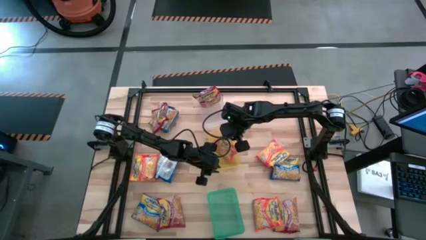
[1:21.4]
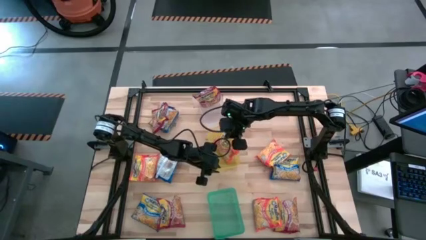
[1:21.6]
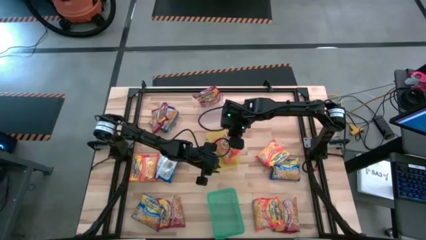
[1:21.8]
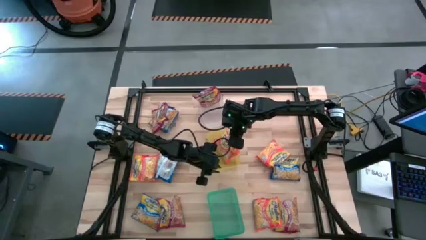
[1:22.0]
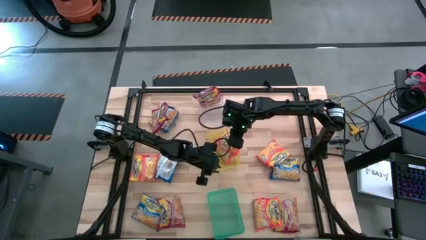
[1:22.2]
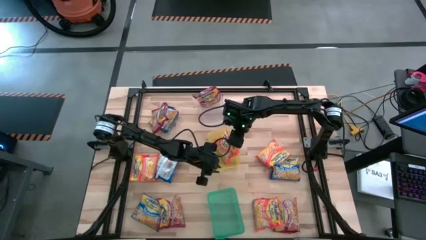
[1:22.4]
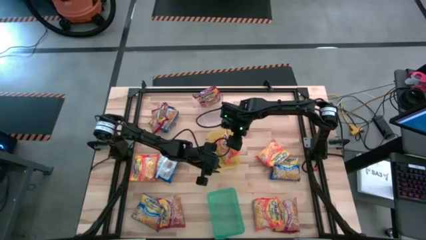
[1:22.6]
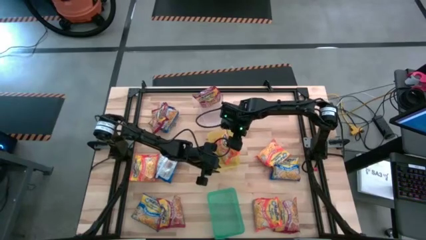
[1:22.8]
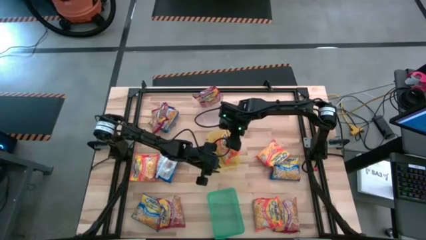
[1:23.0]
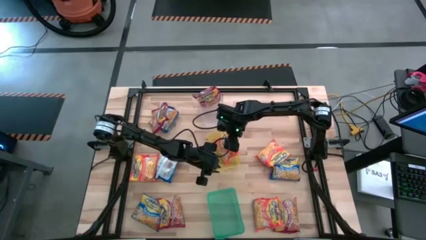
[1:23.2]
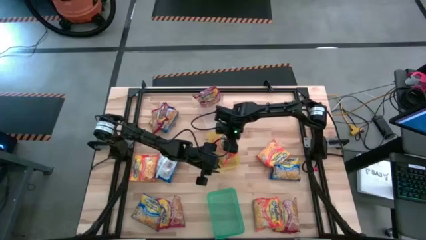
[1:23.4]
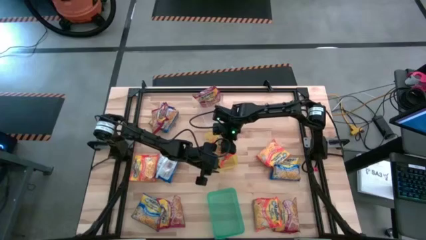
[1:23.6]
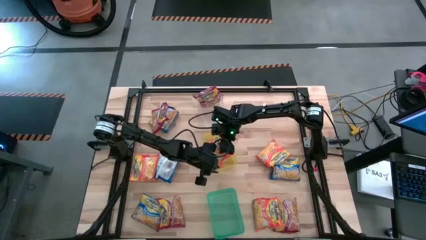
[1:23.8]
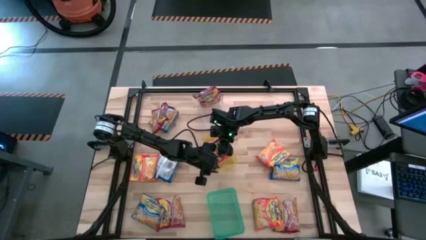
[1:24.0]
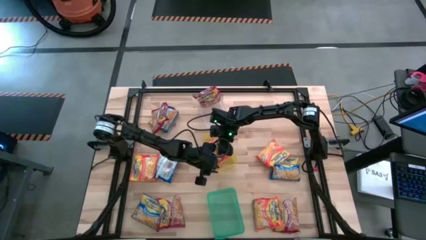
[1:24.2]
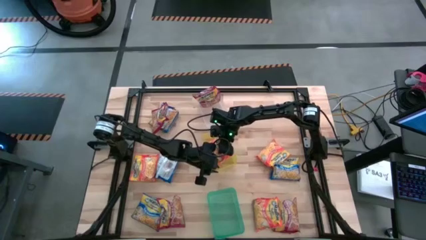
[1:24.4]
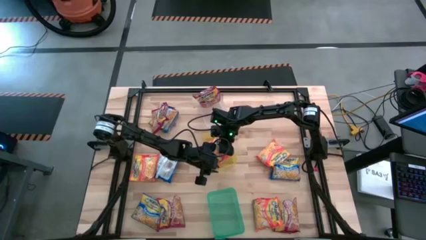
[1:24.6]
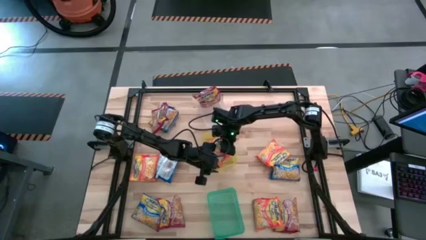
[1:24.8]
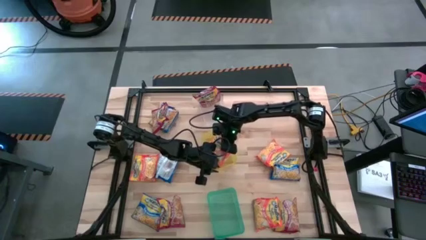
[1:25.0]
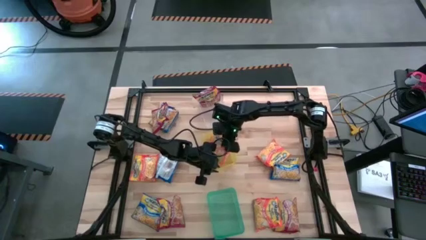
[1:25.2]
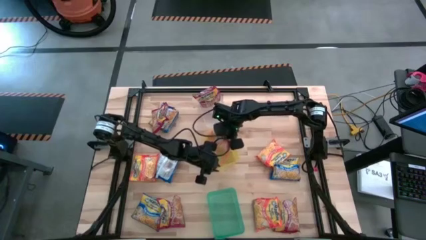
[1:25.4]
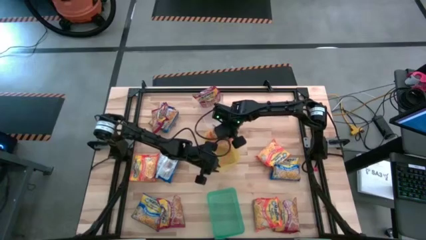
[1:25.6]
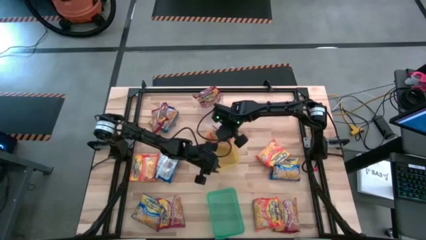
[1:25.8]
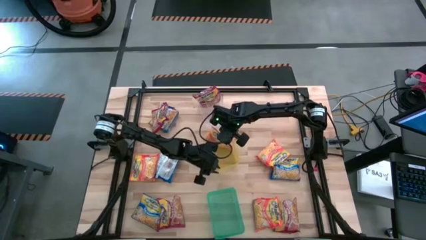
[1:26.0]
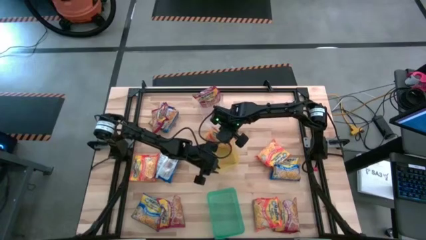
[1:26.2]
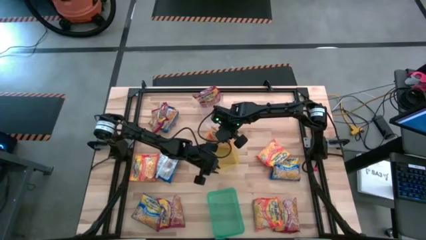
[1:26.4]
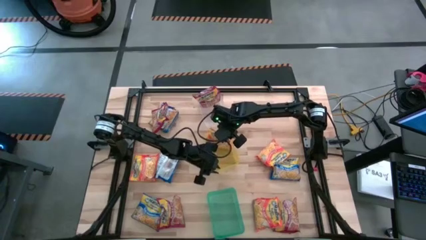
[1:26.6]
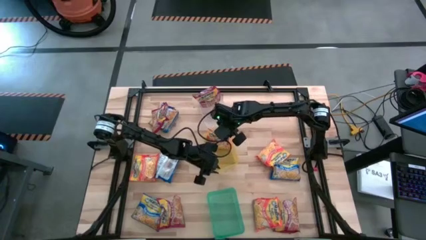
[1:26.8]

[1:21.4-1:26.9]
Task: Sort Maruchan noodles
Adjust the orange noodle pack in the yellow bin

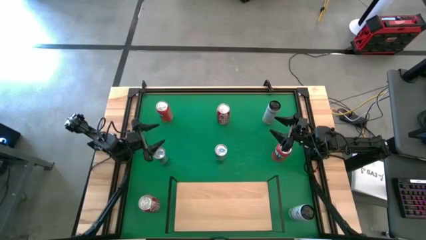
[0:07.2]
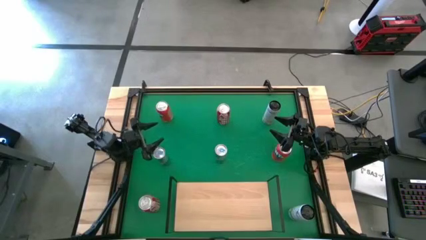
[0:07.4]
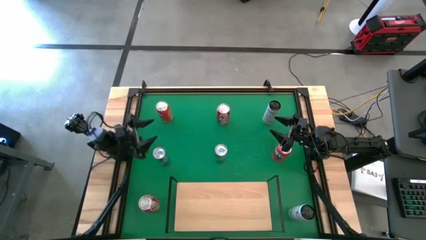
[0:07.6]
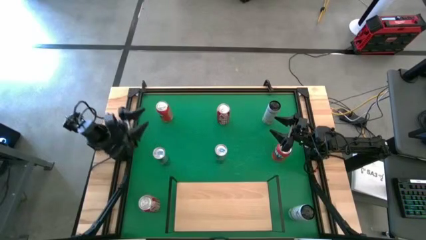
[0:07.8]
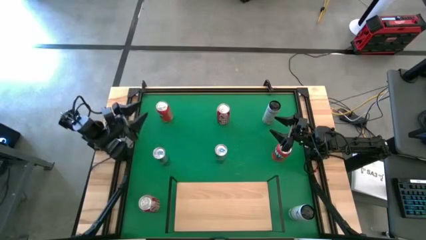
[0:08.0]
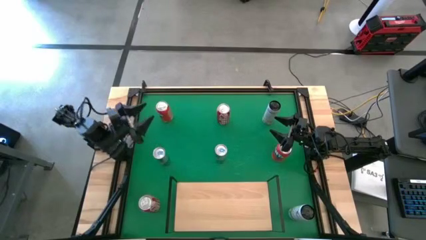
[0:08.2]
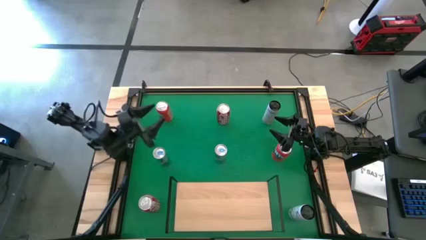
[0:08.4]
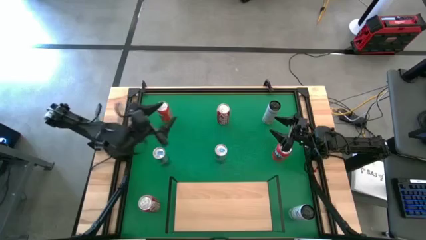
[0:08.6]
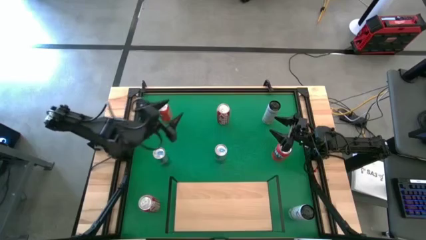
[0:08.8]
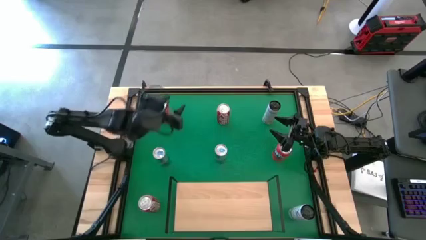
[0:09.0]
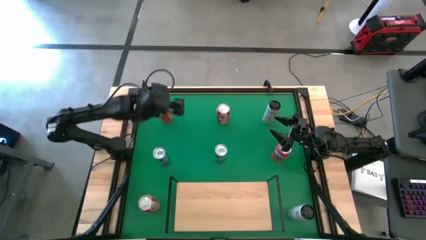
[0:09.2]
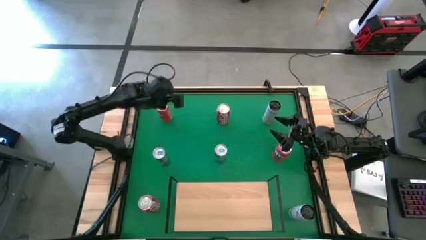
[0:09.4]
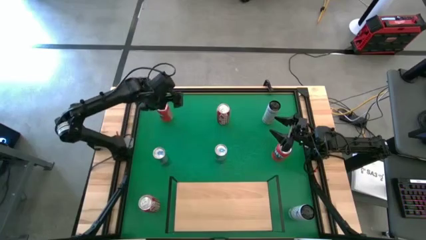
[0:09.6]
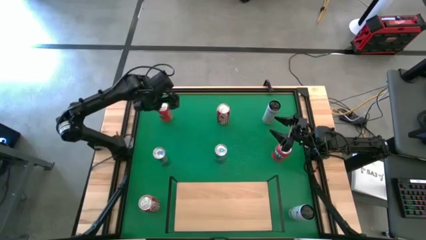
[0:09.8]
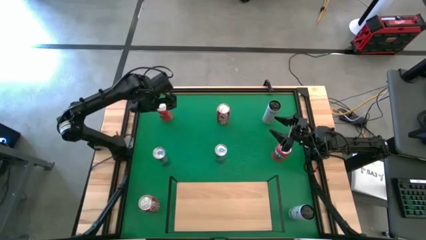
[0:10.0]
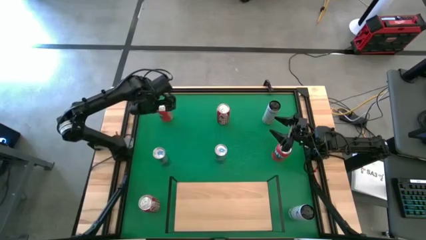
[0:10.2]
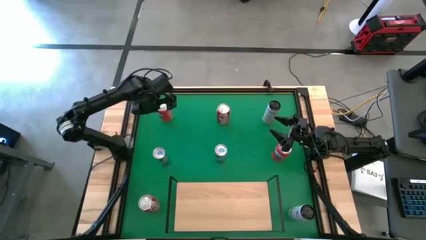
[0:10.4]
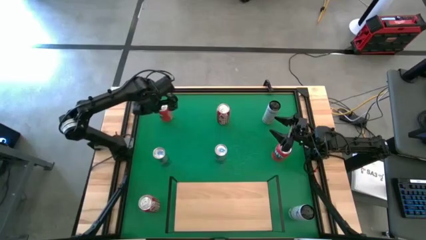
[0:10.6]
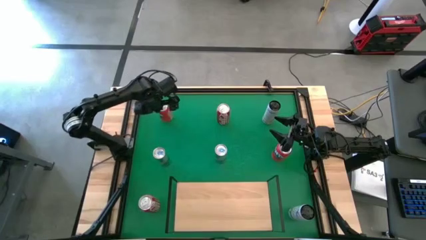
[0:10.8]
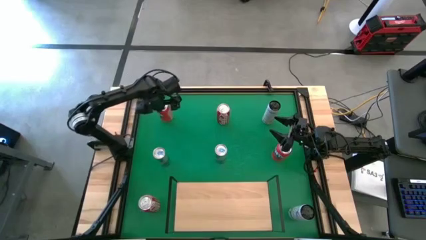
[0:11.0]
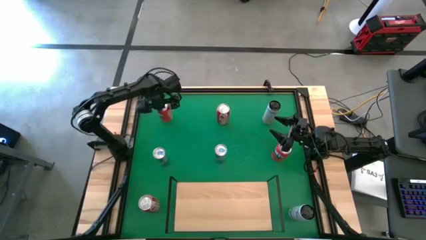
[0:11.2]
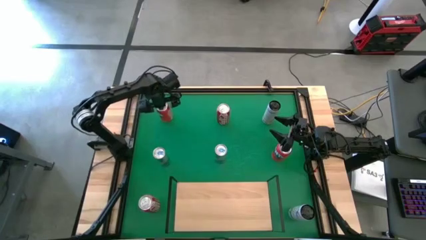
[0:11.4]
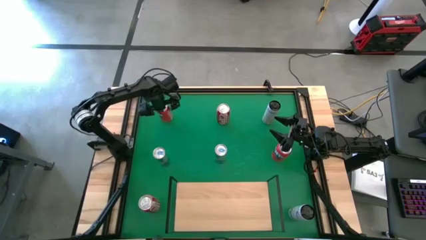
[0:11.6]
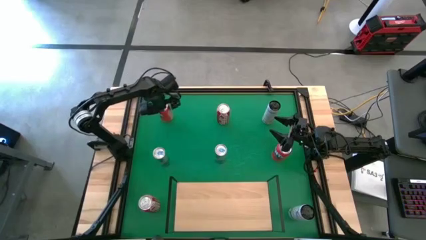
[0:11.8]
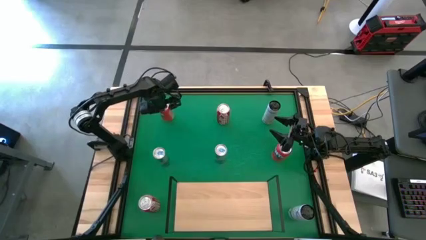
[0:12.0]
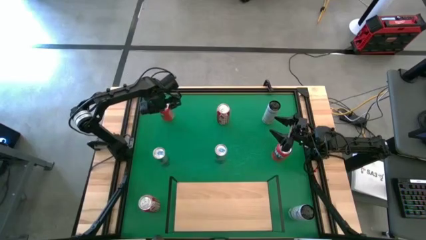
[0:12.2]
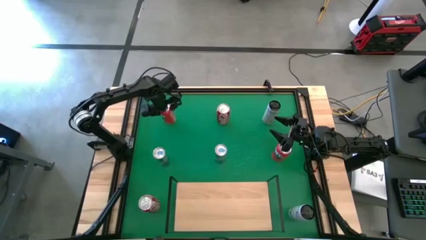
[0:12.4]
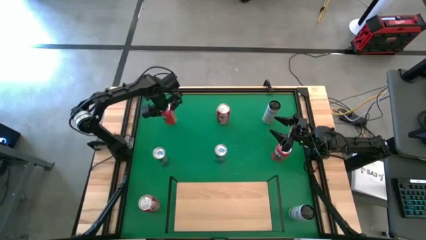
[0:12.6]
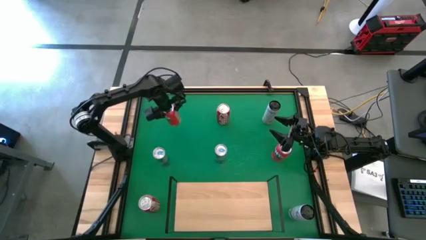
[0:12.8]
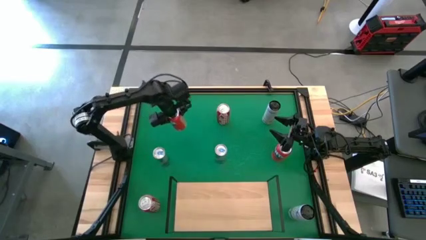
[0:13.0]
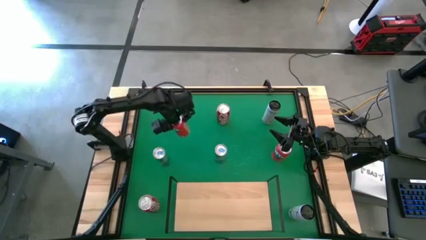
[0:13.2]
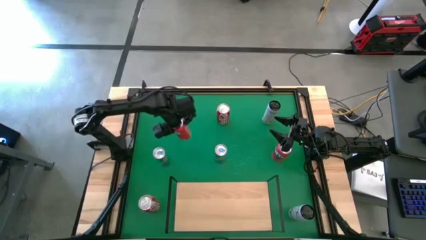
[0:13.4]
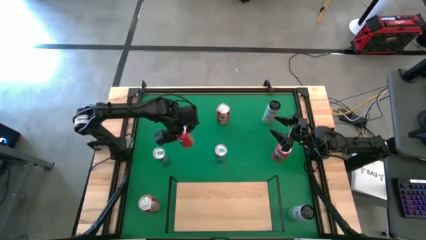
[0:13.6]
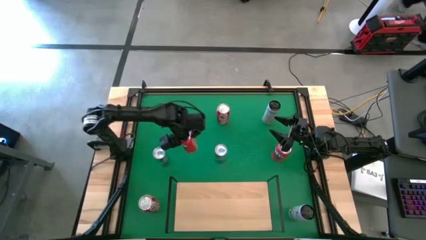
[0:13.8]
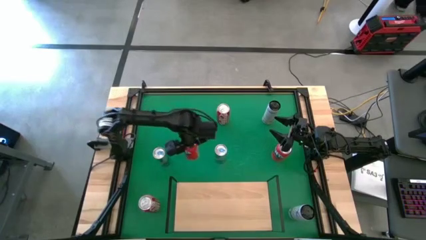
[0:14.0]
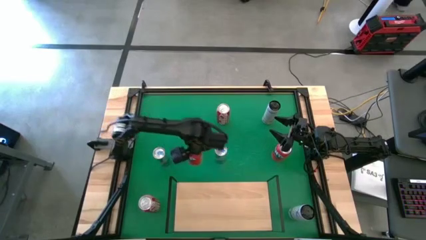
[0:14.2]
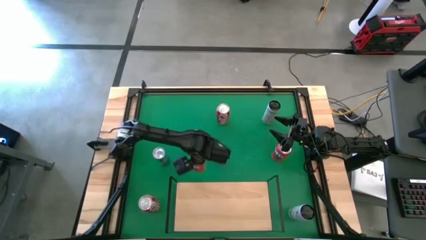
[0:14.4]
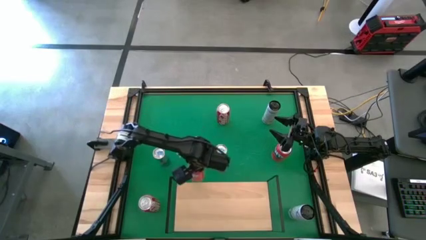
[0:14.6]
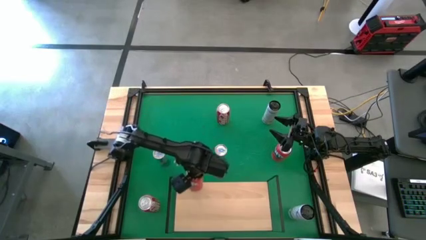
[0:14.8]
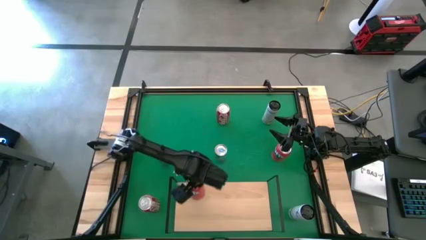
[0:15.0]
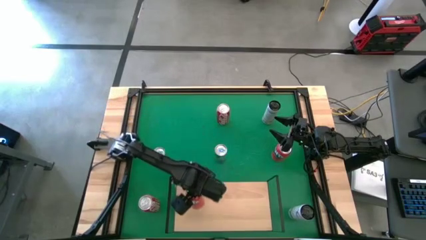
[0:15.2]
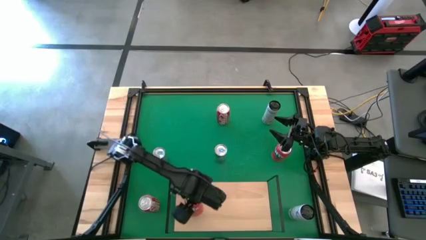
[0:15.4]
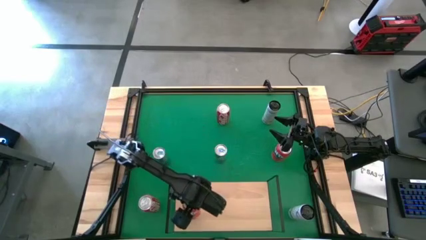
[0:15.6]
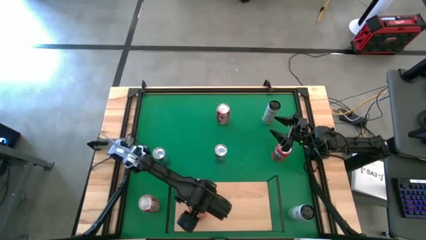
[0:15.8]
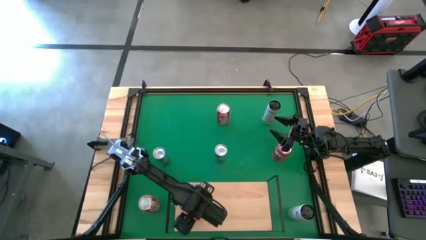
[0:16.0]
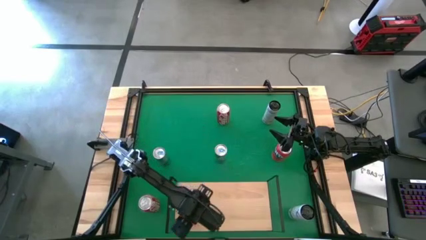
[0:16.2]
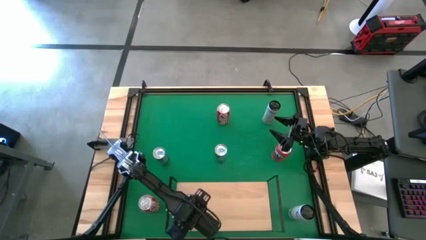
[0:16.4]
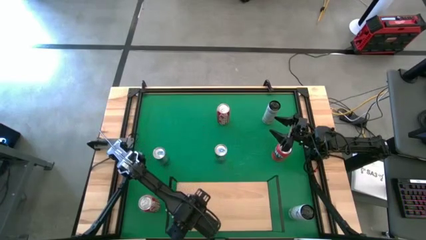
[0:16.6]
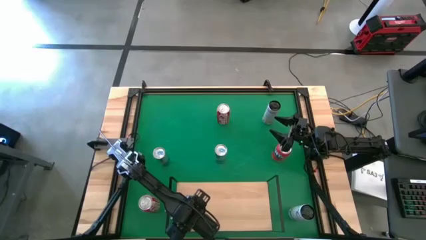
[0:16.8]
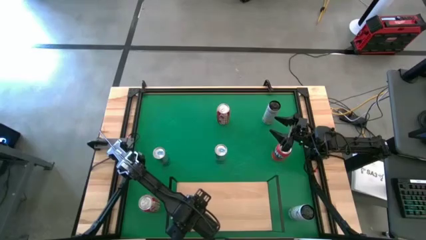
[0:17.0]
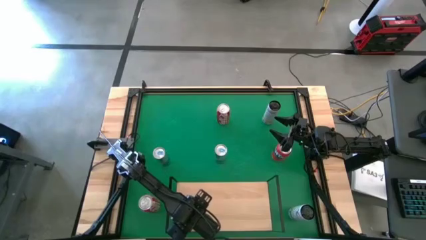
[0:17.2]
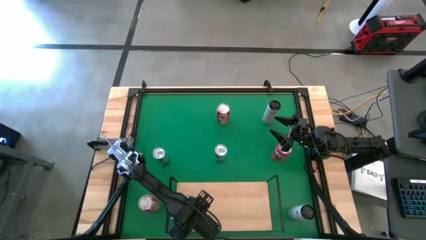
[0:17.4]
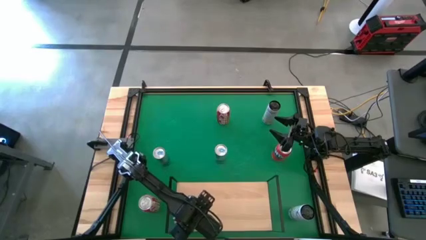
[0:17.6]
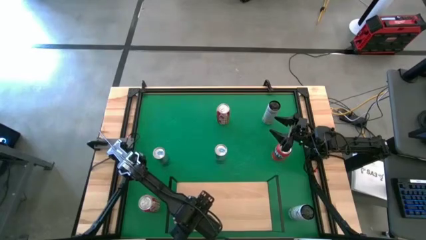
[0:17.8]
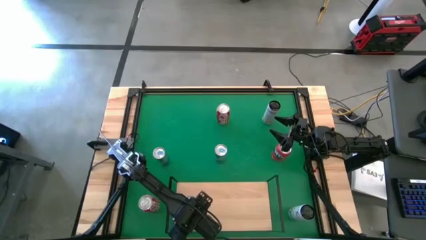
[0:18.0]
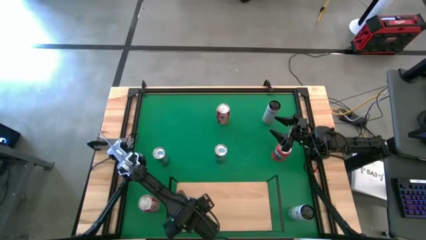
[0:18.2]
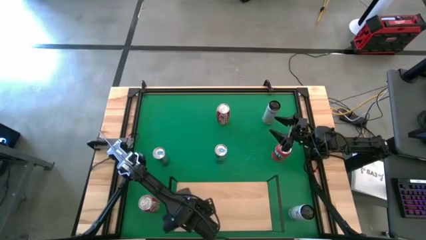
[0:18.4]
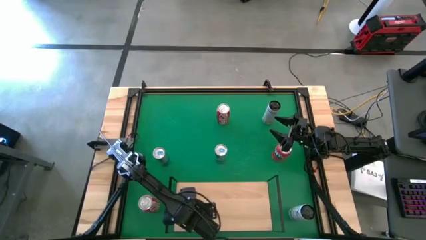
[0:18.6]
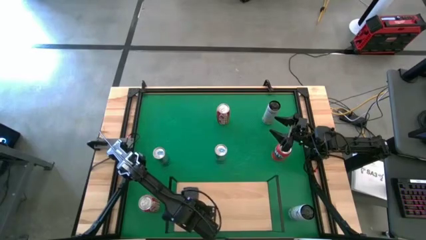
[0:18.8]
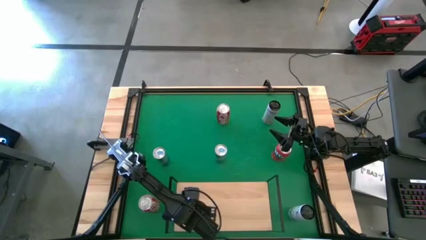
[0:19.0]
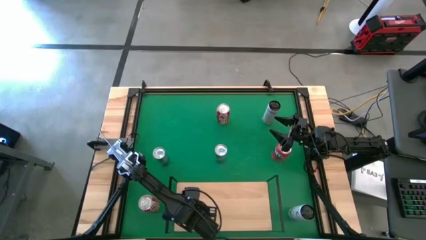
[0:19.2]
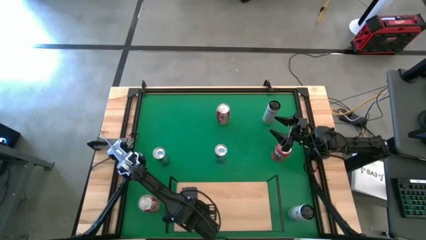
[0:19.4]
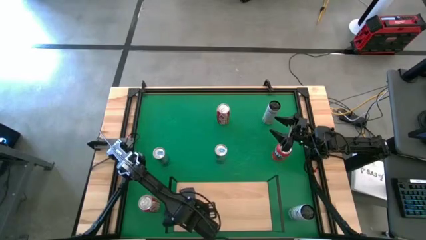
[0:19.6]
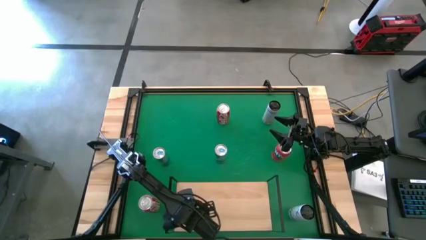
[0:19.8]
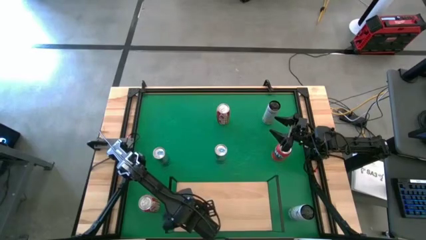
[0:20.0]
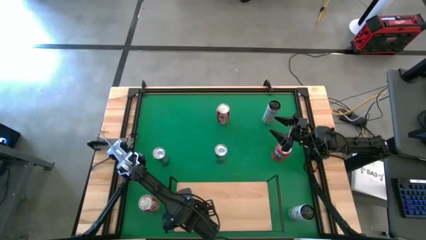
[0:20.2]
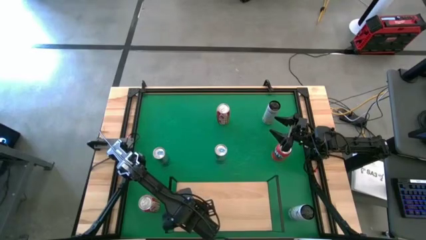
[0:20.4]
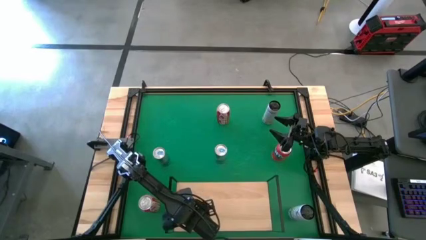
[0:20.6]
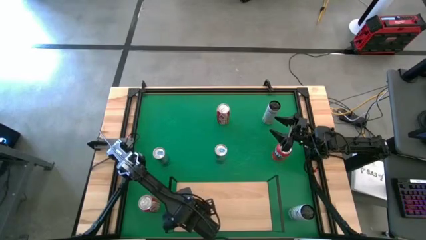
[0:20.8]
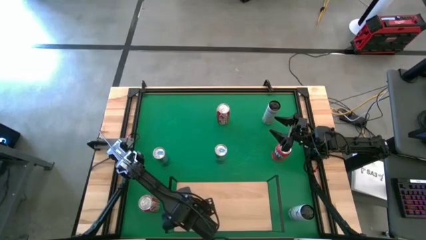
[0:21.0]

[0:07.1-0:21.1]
Task: Place canned beverage on shelf
Put the top orange soda can on the shelf
